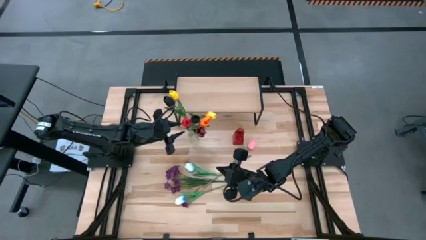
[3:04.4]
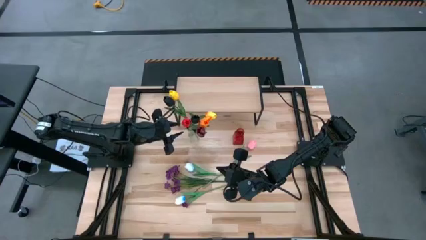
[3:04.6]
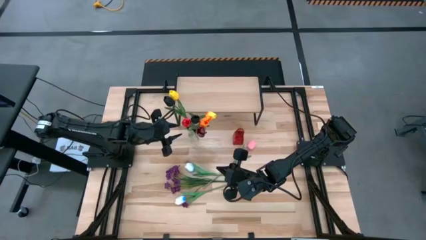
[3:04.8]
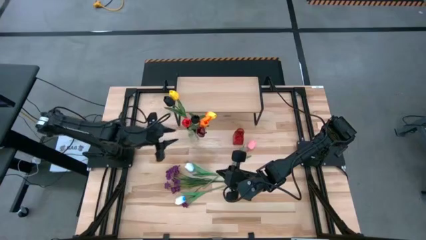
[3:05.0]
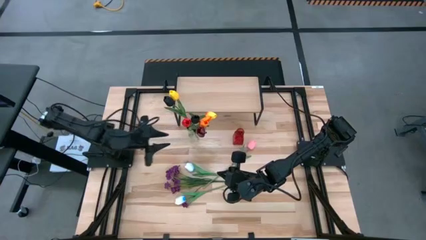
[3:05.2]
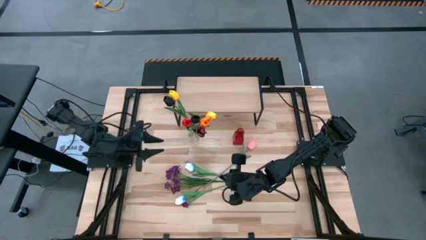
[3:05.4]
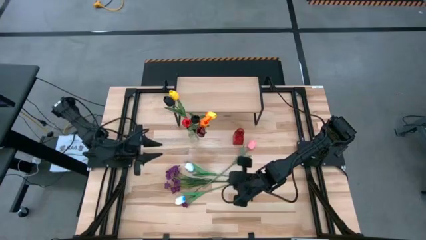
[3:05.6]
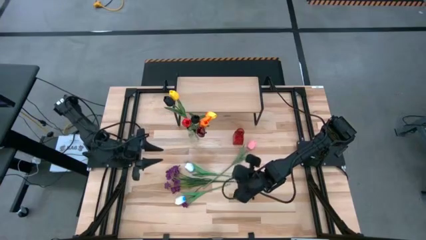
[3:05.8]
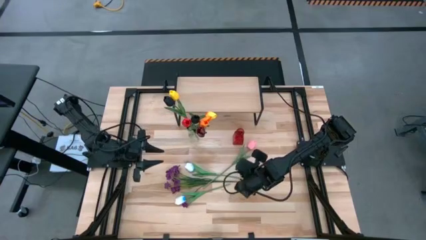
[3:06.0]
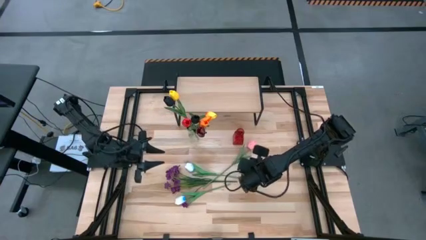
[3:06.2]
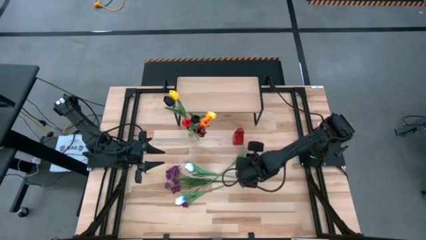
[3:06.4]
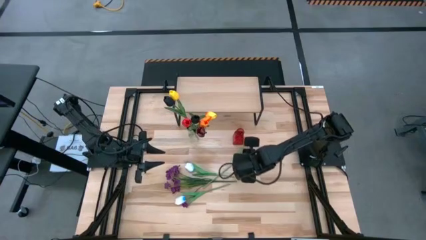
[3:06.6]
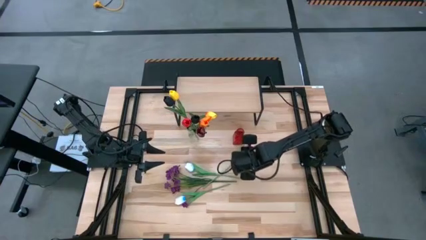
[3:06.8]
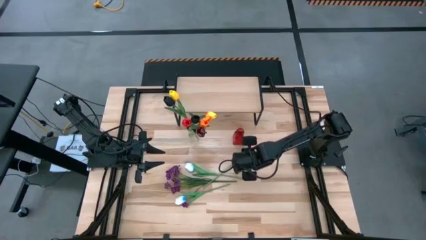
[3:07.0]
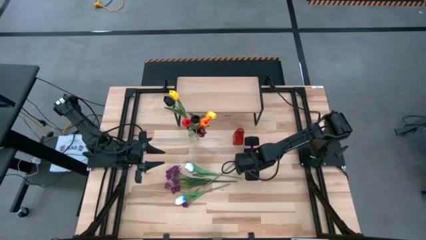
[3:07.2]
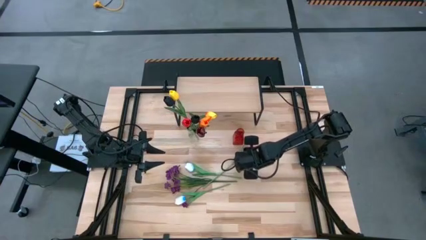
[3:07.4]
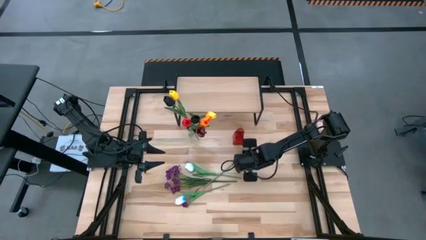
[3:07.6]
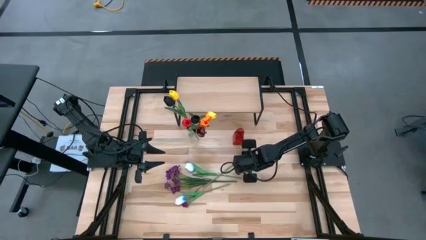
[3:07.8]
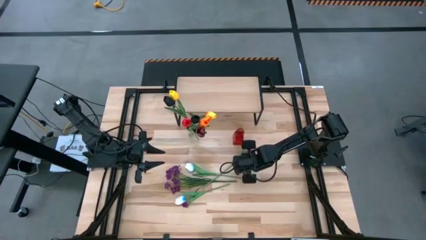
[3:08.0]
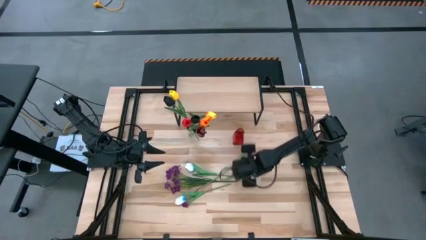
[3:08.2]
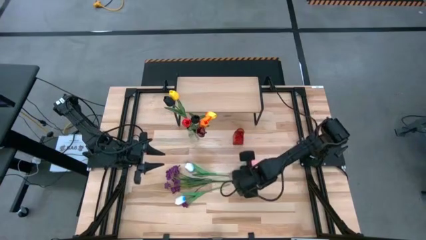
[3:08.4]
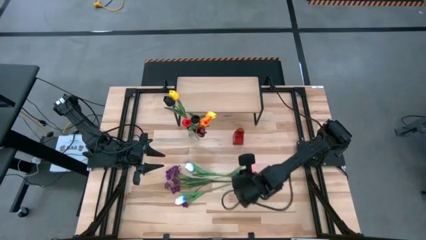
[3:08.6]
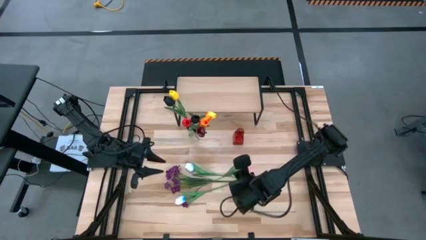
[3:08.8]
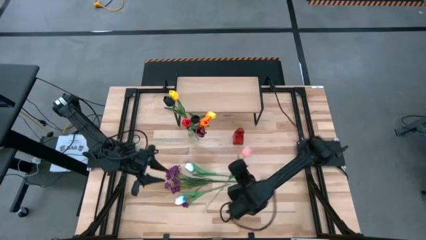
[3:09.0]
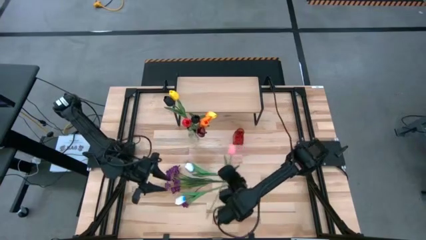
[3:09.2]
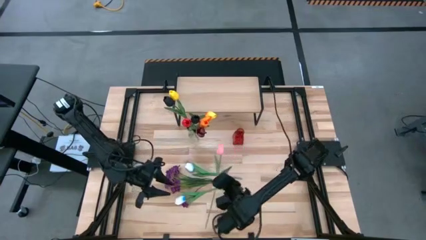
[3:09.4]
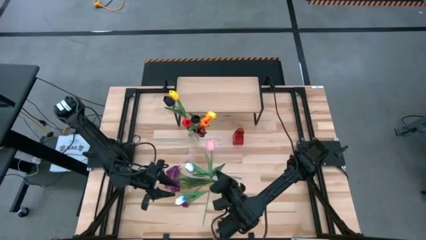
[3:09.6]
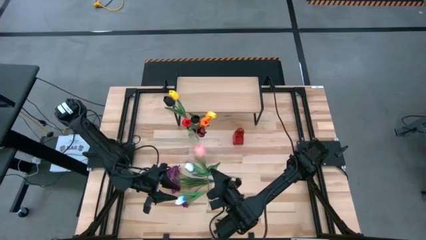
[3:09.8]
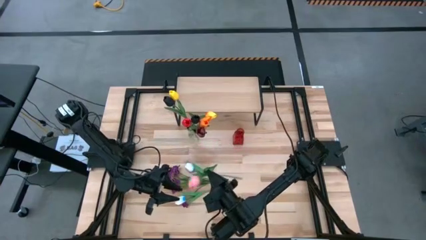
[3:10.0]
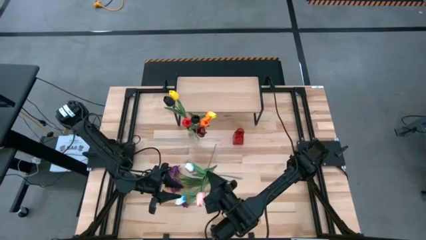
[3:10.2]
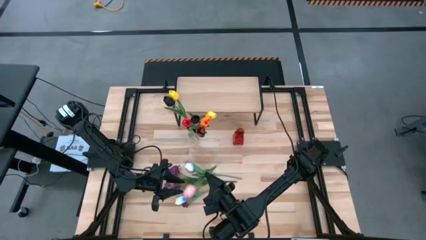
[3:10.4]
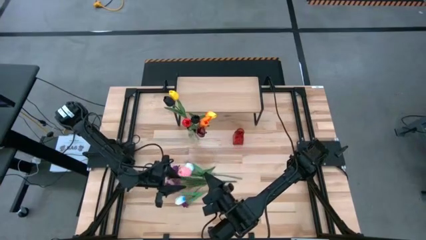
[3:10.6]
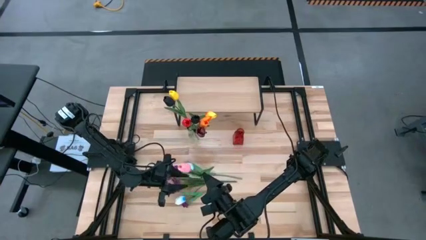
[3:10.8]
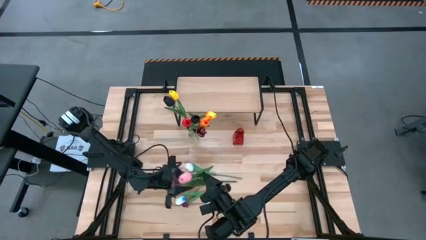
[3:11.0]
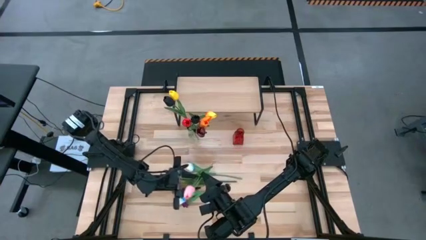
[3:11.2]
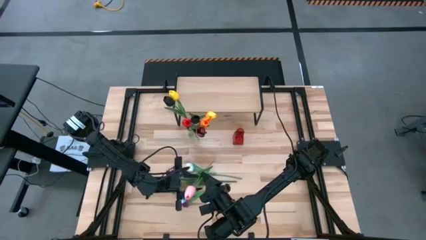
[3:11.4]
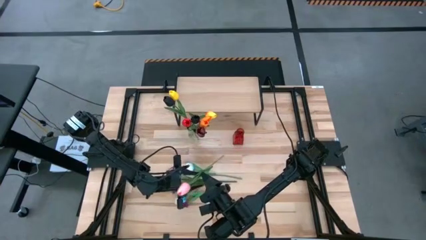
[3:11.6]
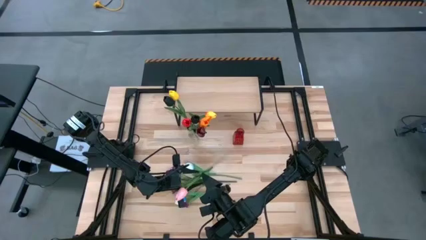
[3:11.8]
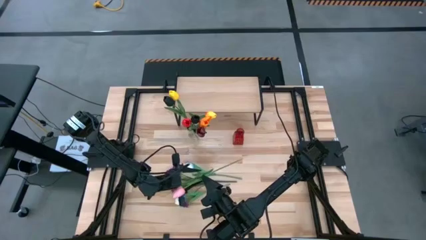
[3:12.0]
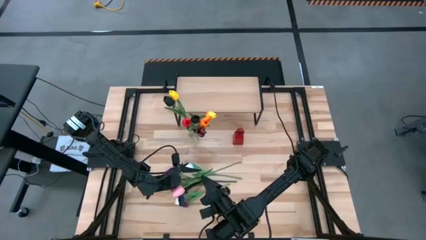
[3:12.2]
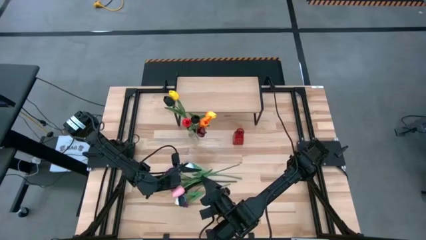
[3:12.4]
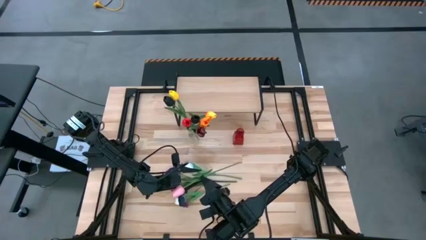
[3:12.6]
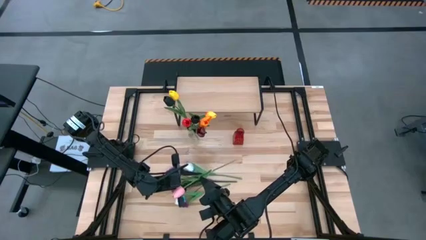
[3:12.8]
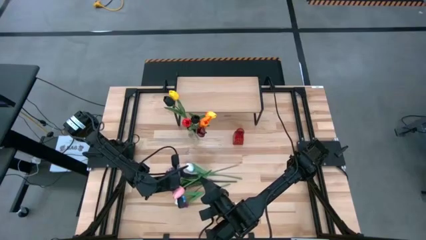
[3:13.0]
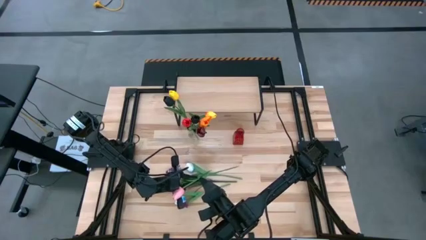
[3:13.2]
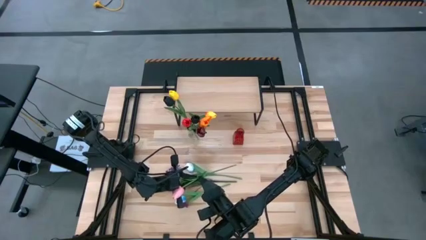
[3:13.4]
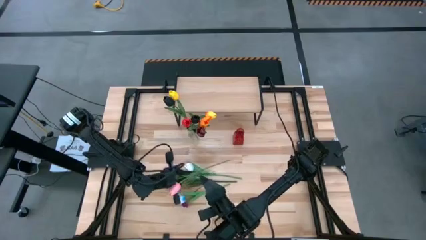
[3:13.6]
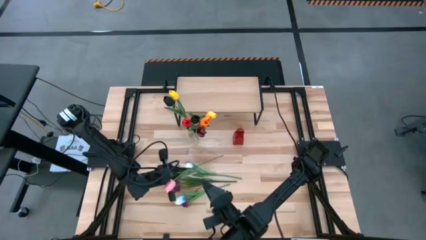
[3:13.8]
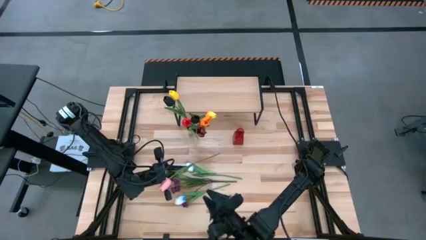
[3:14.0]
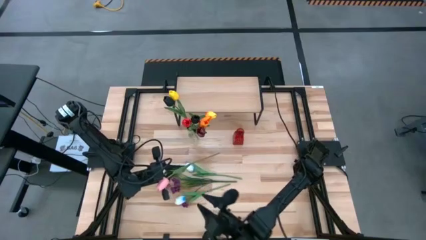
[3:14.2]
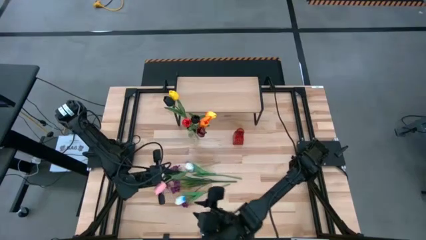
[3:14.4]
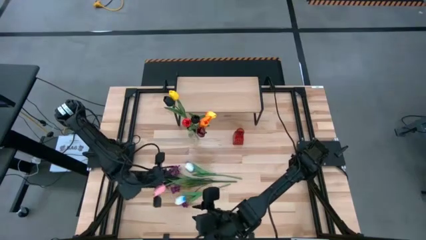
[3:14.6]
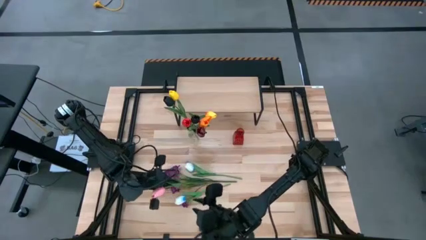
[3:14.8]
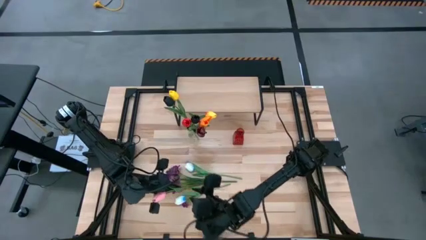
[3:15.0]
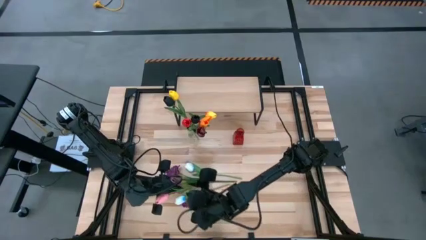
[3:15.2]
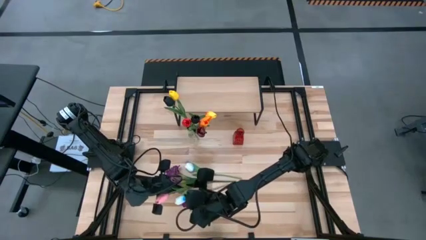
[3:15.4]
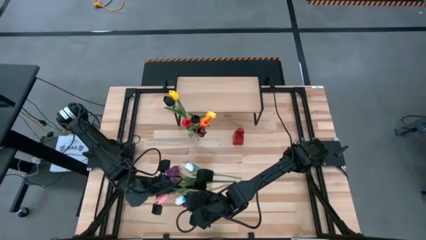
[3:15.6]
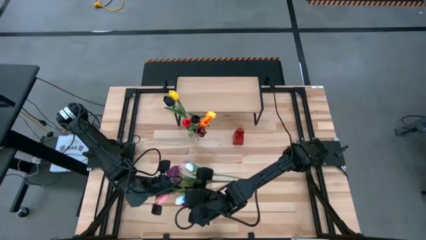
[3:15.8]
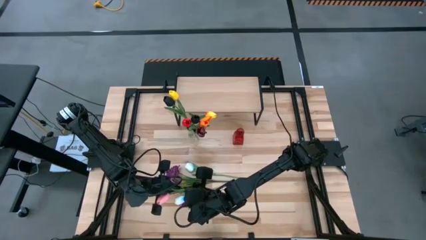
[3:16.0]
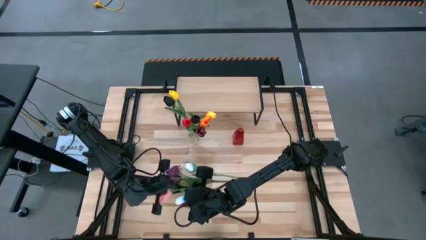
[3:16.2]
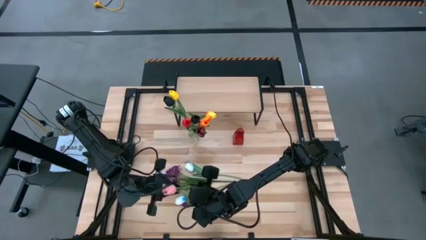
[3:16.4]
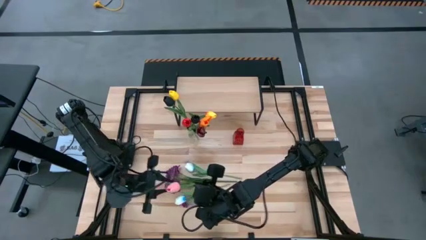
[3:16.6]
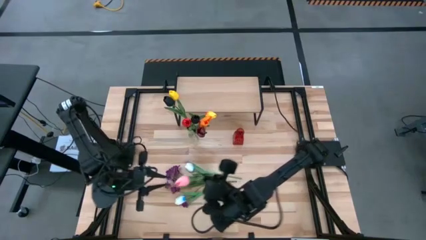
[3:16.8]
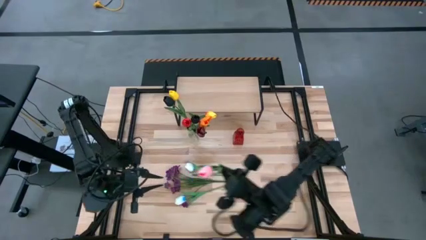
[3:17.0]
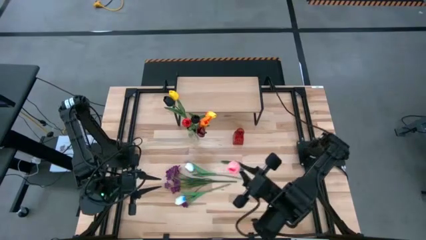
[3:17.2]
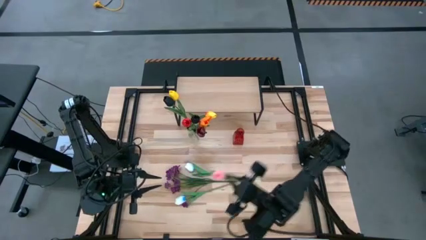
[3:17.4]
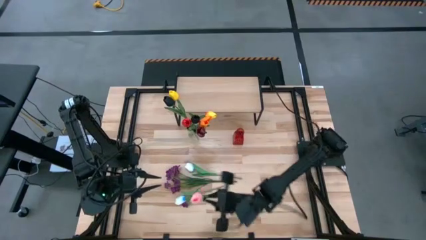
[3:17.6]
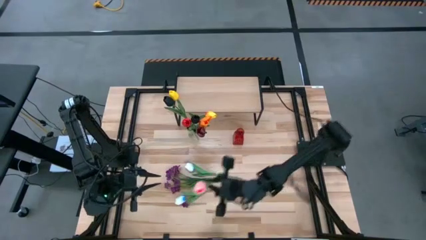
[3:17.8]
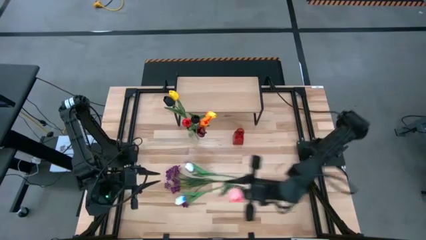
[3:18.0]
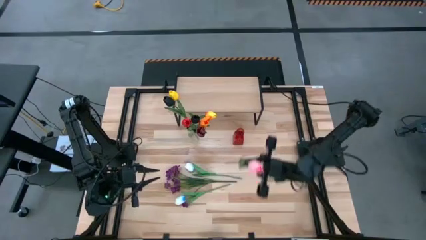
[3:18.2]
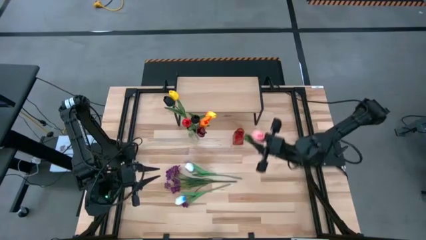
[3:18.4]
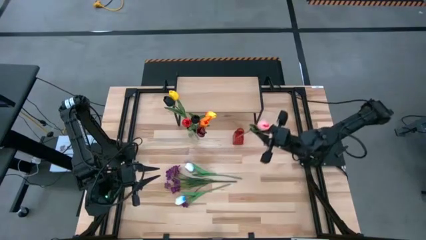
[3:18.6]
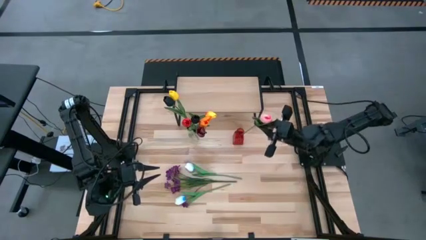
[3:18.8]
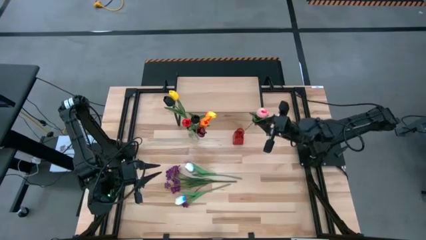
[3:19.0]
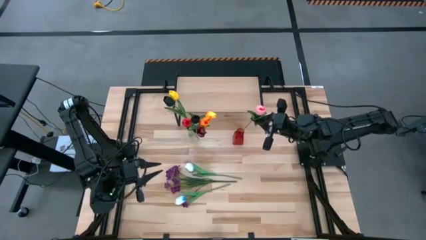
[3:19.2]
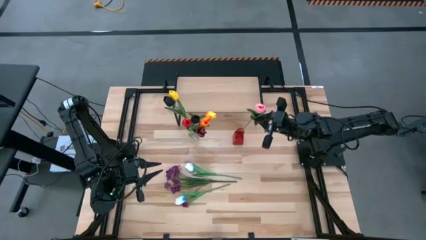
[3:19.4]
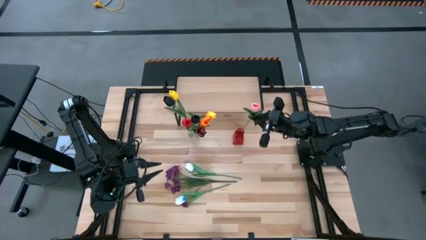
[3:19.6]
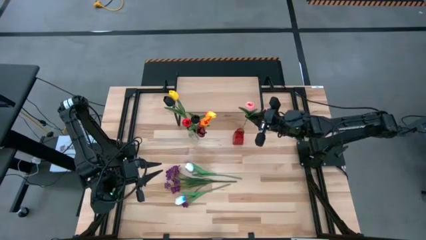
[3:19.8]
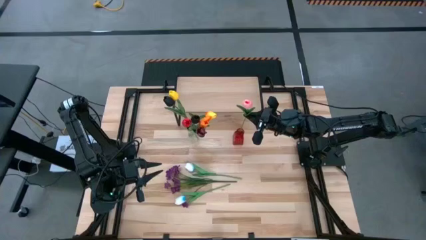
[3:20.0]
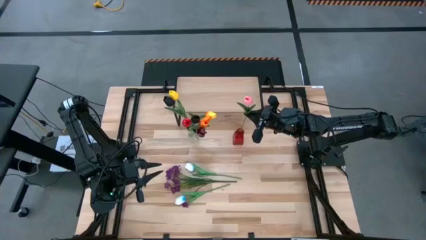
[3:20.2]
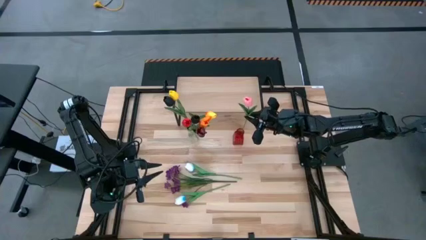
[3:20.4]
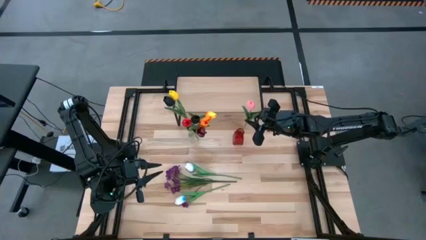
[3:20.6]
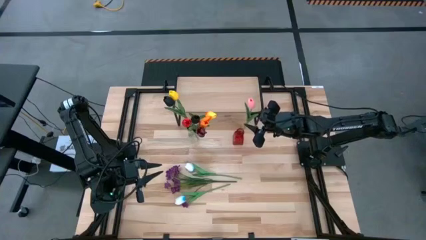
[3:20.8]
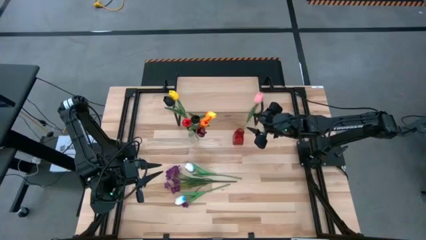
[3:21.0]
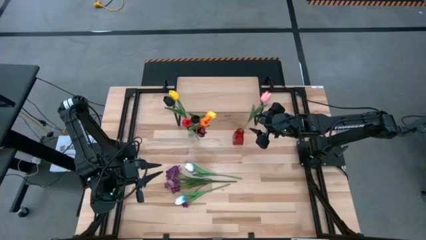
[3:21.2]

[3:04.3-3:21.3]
Task: Pick and place flowers into a vace then onto a shelf
Put the pink tulip into the red vase
